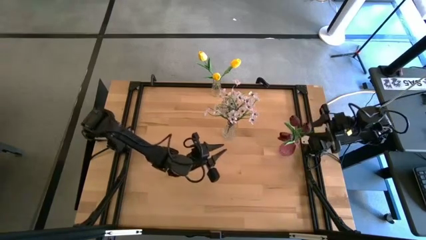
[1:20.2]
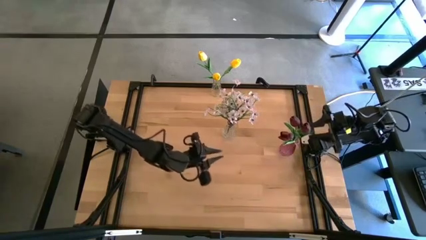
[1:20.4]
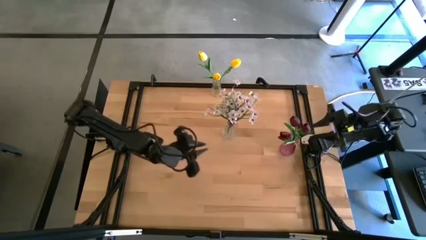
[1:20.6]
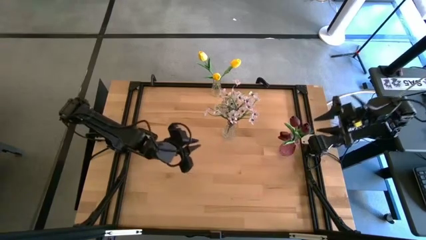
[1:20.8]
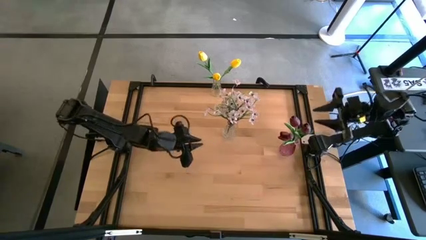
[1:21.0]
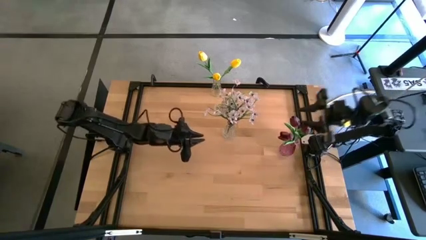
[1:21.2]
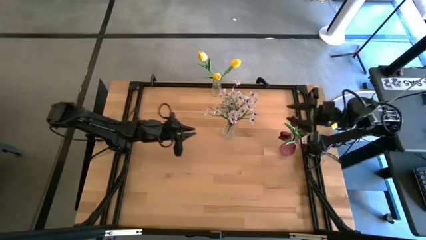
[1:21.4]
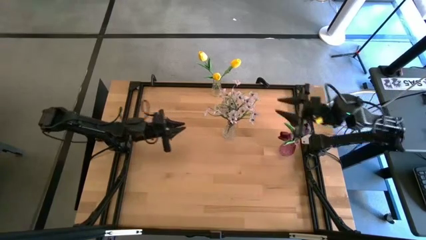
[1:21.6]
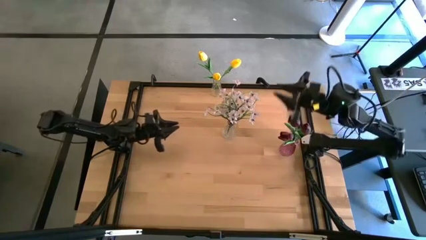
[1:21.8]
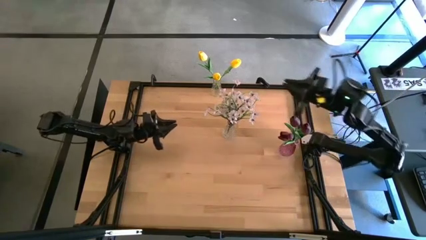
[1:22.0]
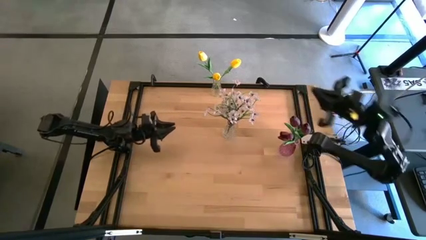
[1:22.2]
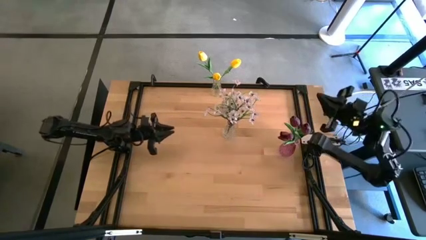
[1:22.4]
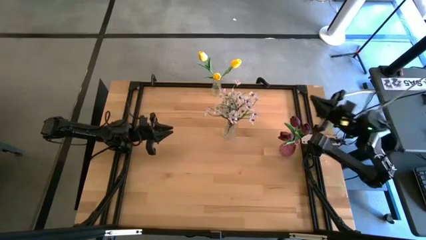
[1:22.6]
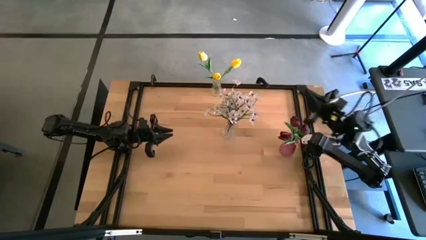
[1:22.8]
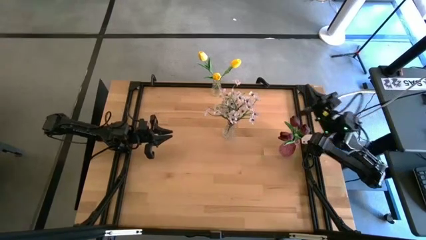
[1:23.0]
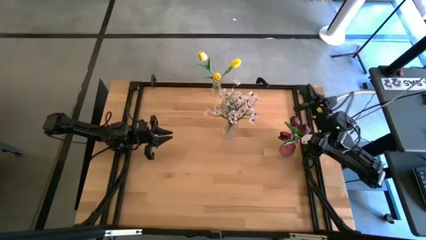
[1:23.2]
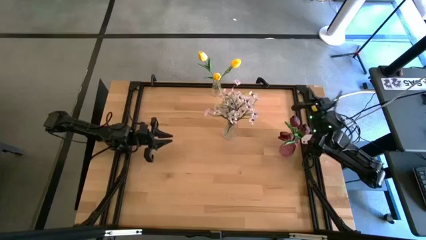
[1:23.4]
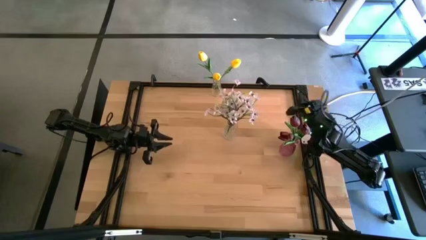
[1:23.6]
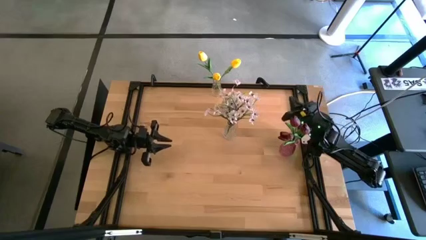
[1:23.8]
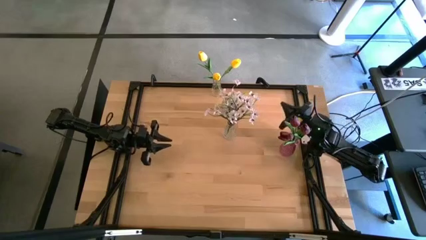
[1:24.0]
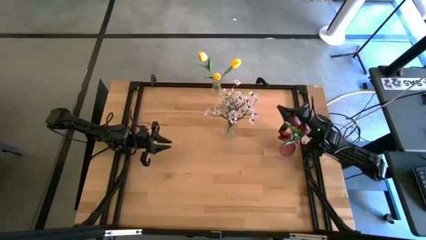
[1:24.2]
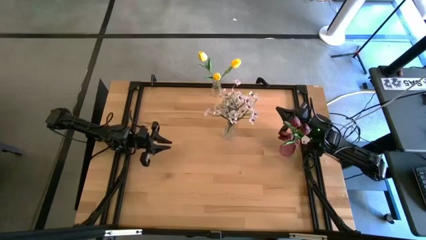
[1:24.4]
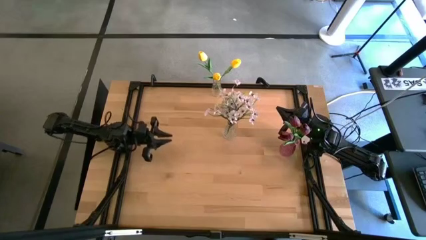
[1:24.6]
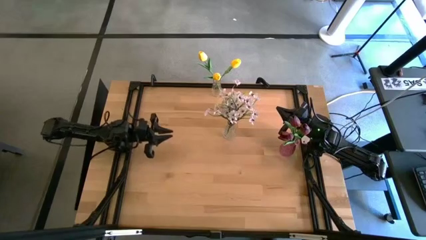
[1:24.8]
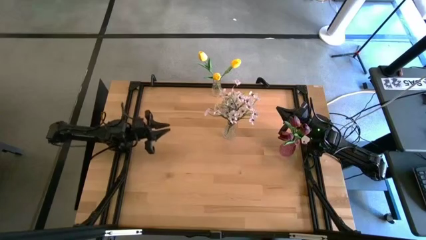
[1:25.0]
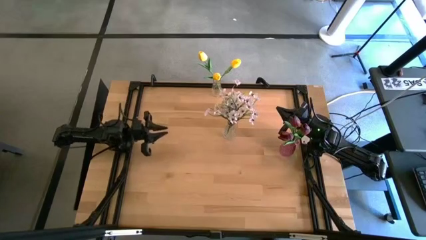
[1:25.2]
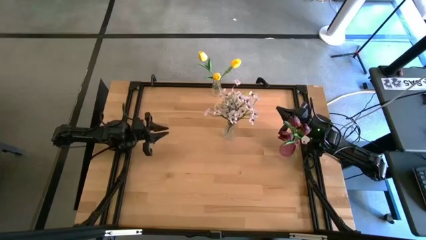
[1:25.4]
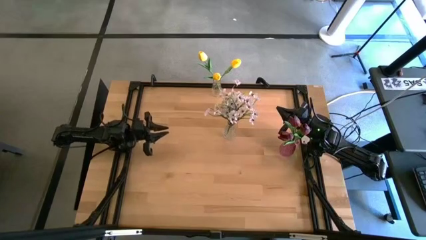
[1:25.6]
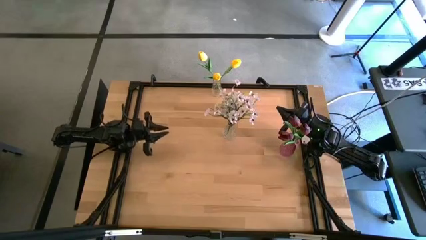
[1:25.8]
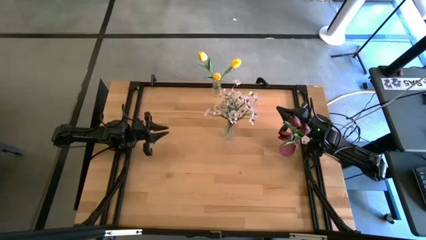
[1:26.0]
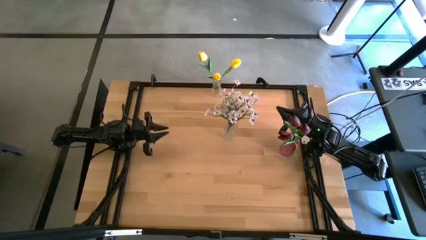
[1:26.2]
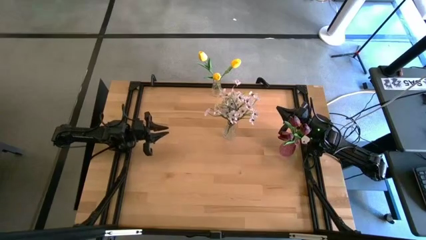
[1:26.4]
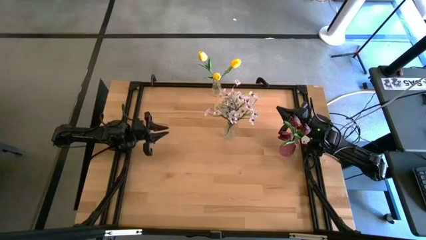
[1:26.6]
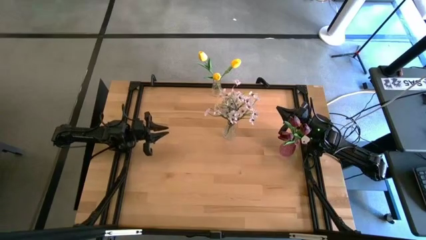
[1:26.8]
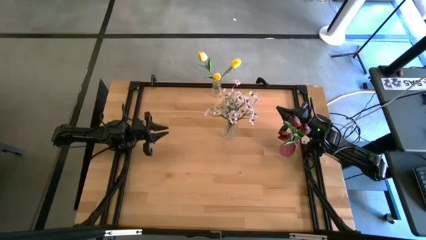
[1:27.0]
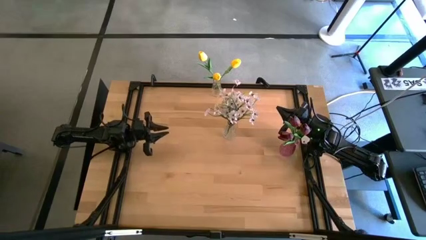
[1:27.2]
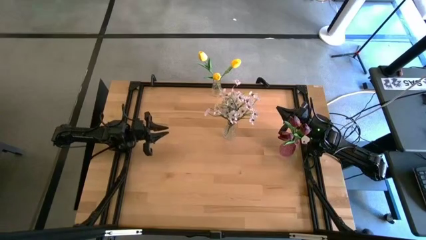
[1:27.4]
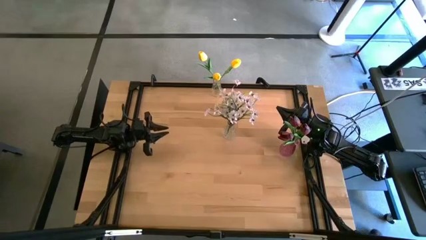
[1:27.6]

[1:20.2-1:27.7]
Task: Sort flowers into vase by color
Return to Home Position

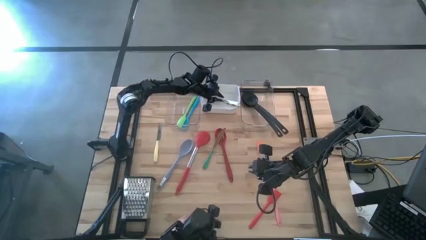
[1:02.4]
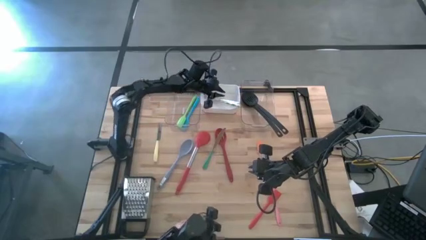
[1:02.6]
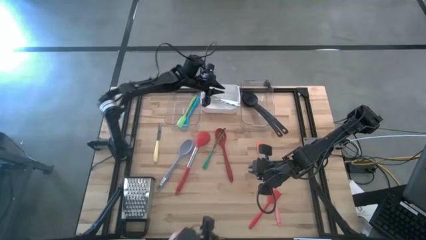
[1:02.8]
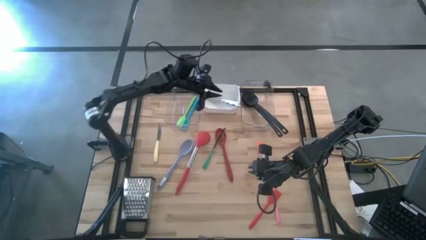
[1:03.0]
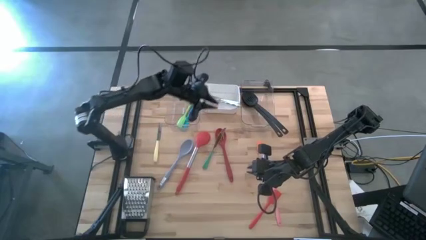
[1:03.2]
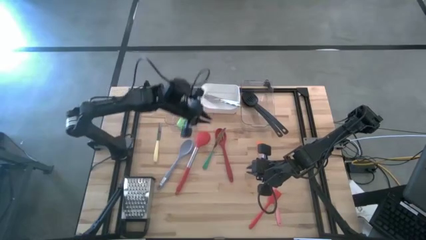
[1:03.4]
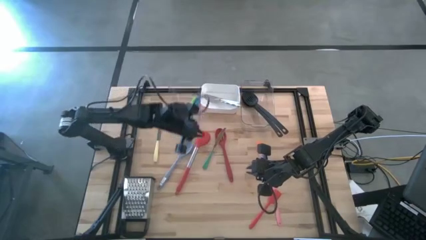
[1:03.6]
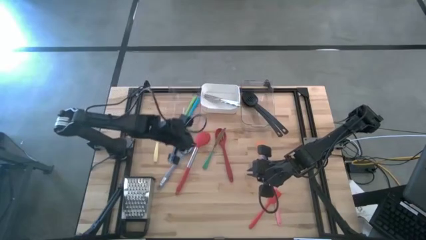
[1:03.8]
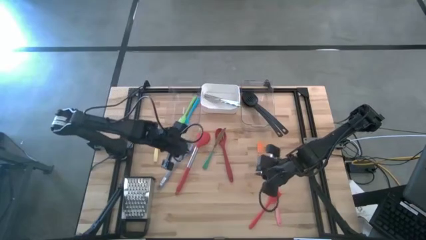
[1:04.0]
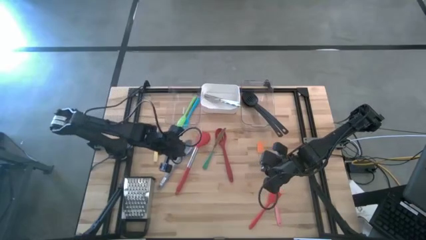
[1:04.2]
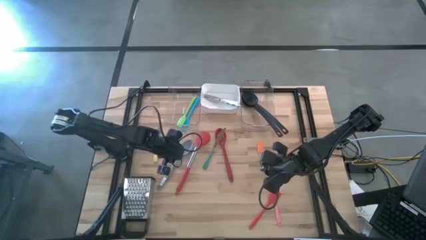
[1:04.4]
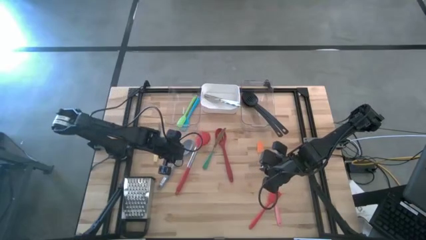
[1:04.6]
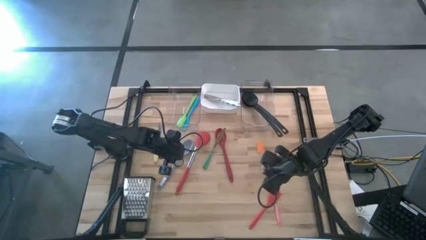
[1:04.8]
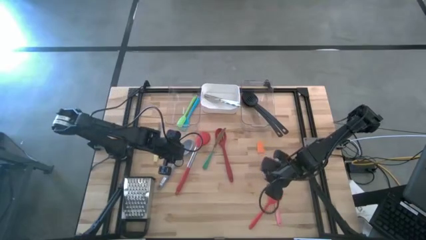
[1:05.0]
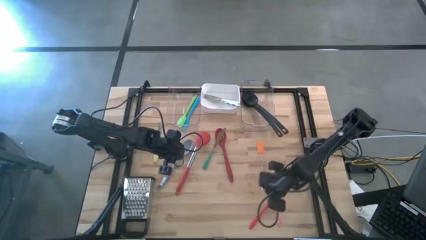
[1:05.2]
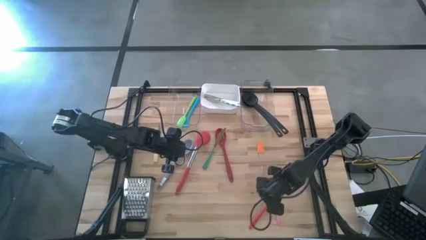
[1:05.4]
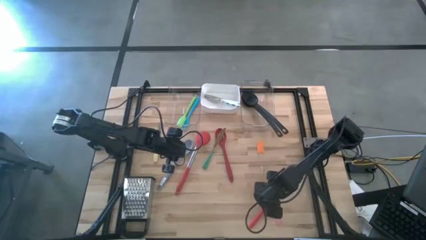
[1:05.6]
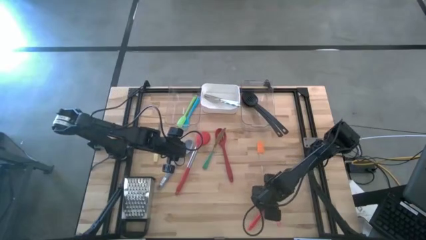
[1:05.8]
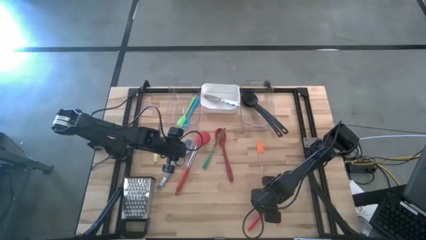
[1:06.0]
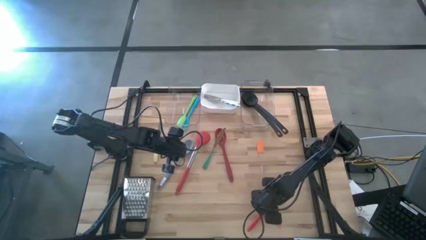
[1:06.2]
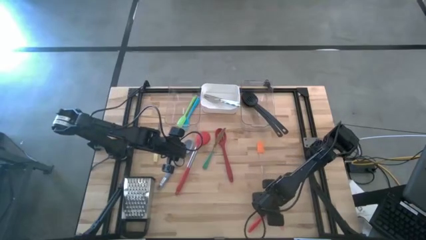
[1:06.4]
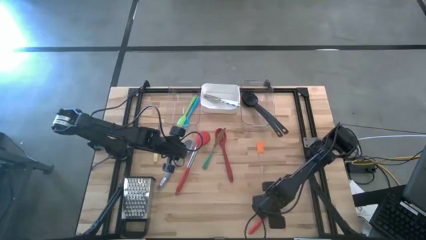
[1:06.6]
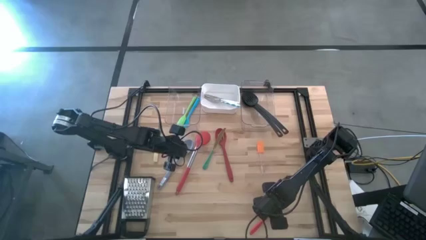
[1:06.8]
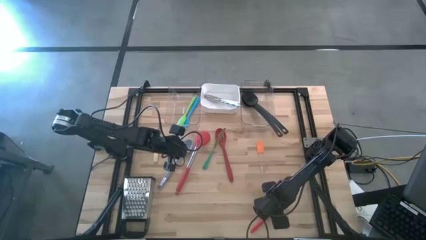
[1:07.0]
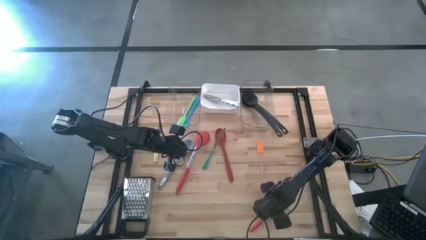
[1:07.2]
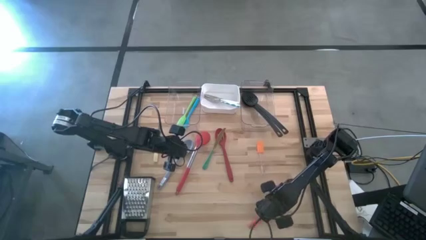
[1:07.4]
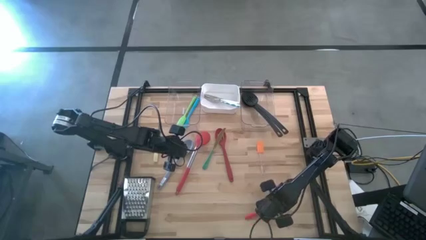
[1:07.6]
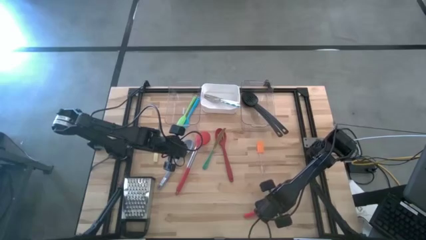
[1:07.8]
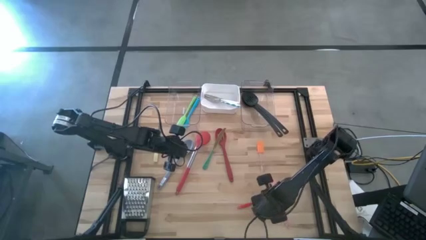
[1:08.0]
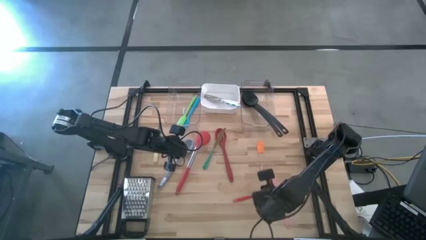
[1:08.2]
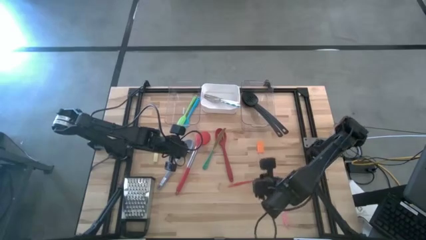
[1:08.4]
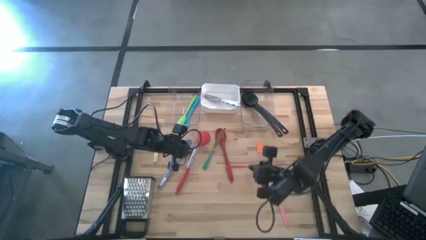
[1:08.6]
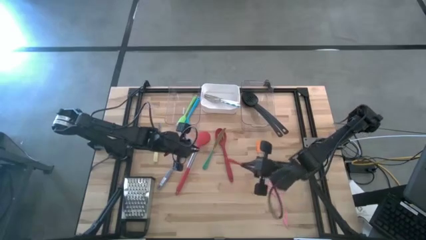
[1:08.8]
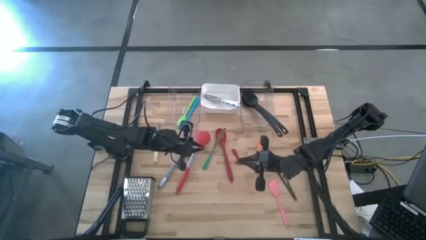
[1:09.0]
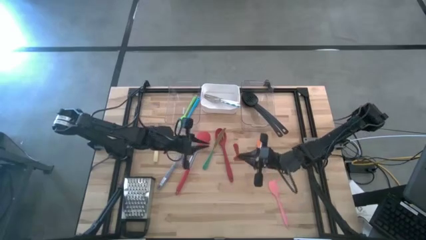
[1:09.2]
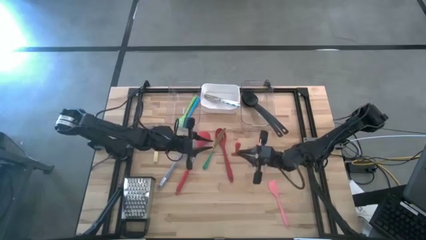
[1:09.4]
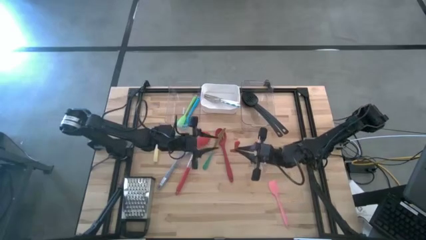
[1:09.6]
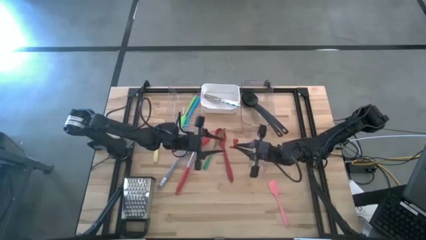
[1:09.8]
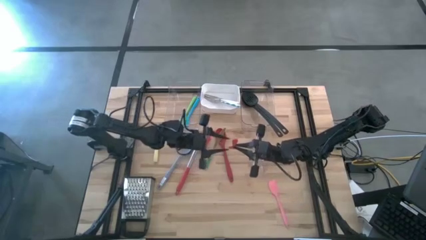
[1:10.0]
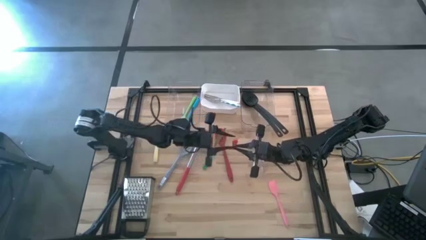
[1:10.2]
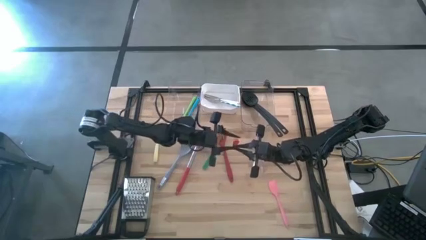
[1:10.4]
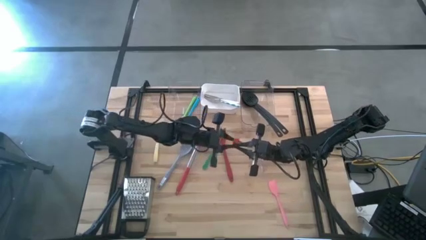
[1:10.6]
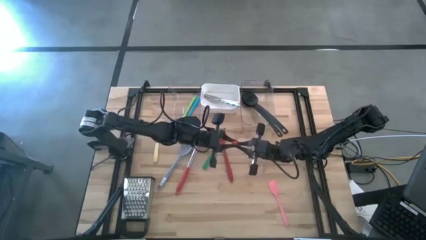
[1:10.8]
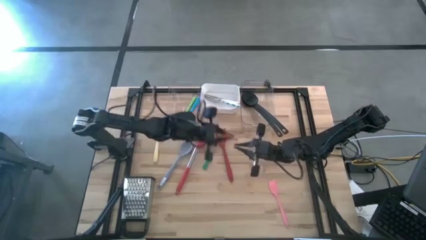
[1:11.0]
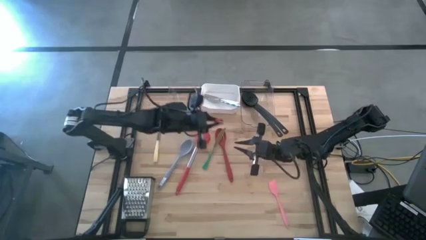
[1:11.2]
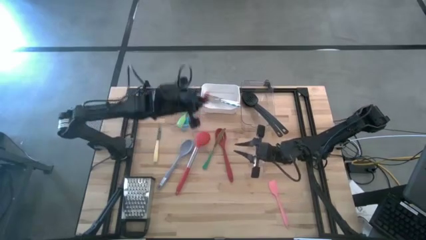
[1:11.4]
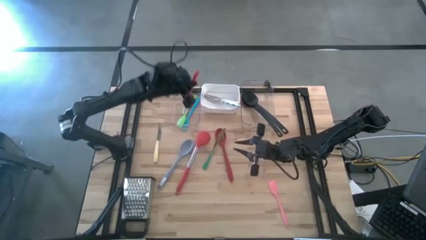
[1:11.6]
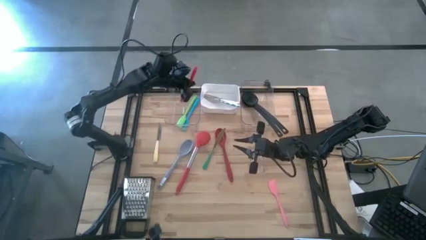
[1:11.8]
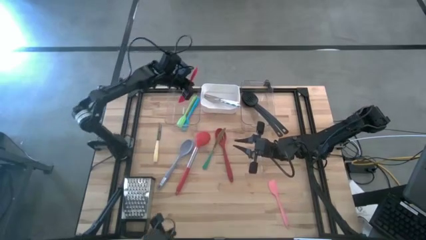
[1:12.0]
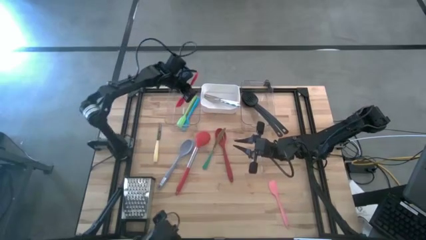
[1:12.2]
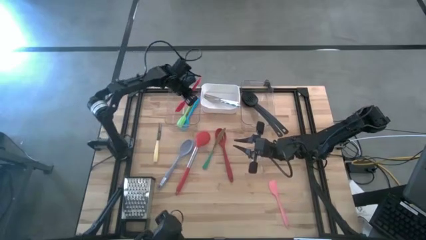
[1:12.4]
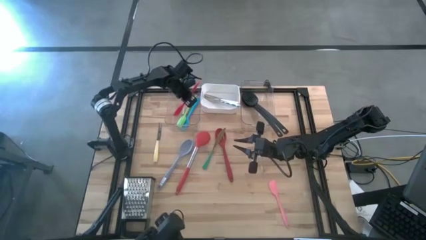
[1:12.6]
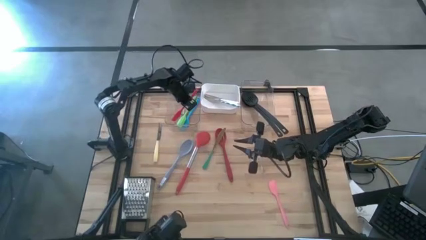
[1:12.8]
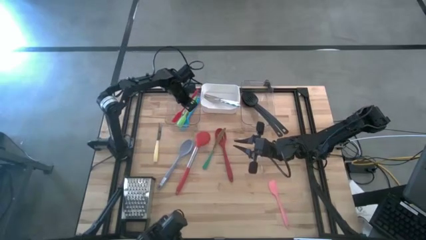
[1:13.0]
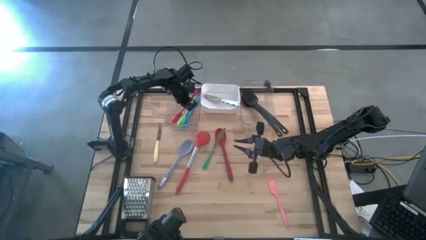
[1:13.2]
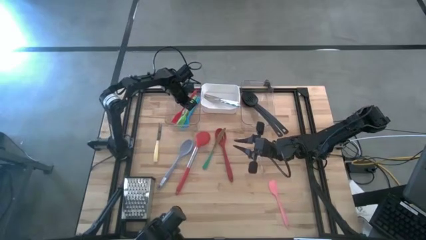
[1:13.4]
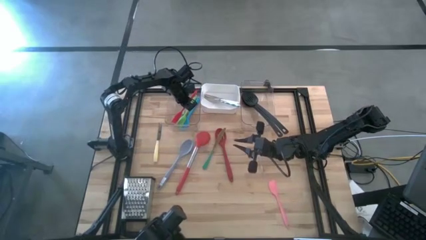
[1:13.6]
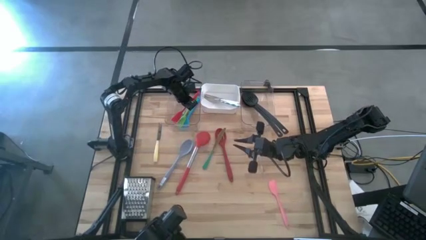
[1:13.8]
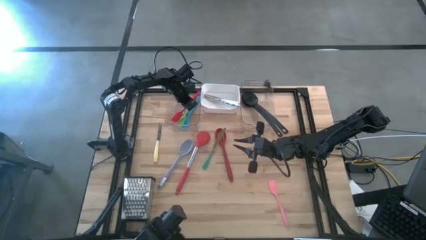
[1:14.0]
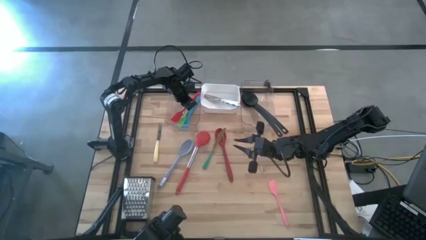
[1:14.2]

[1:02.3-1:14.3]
Task: Pick & Place Kitchen Items
Put the red spatula into the left transparent bin
